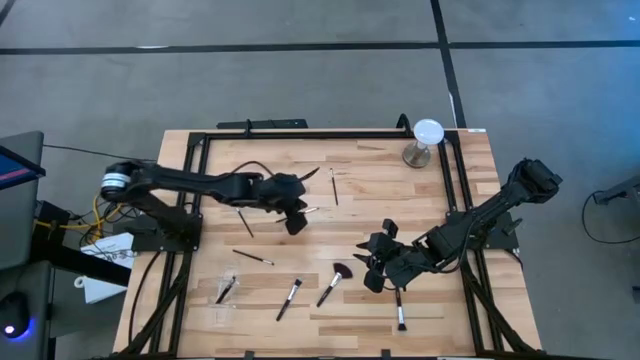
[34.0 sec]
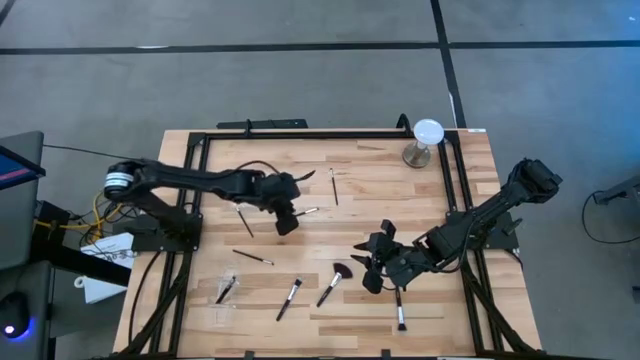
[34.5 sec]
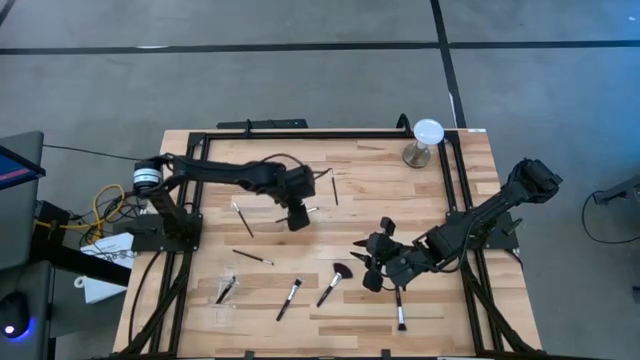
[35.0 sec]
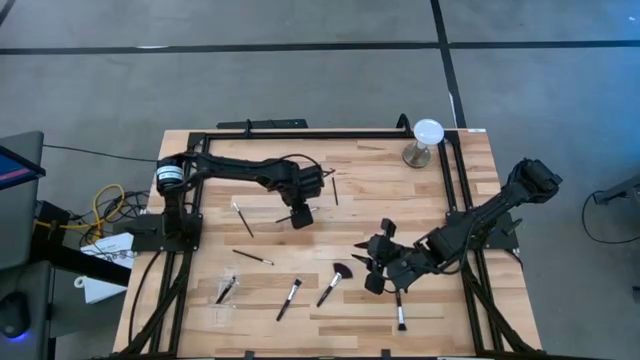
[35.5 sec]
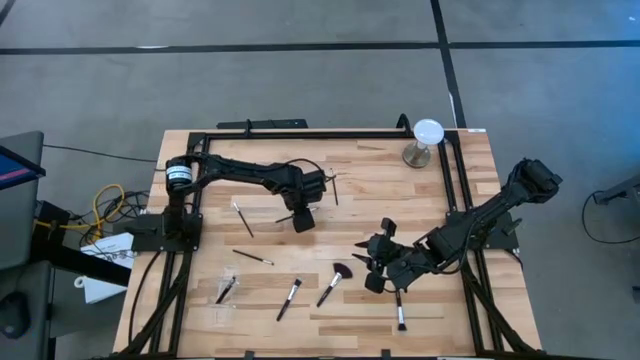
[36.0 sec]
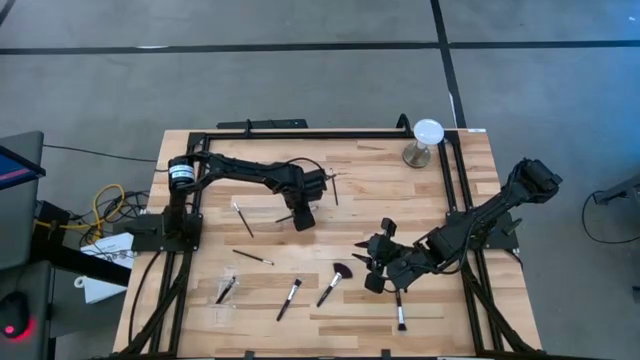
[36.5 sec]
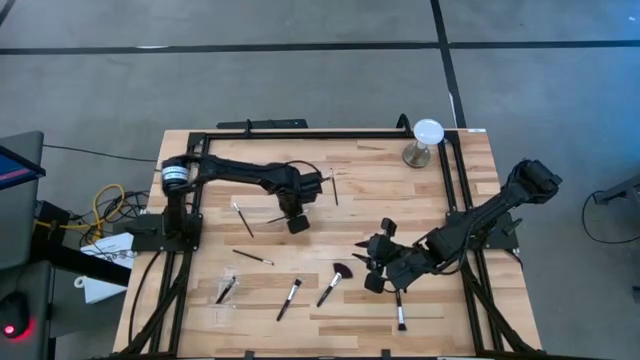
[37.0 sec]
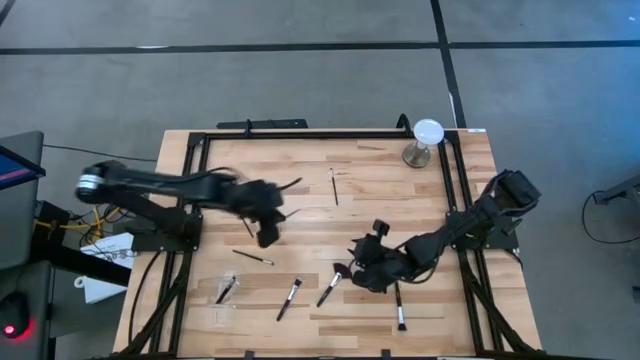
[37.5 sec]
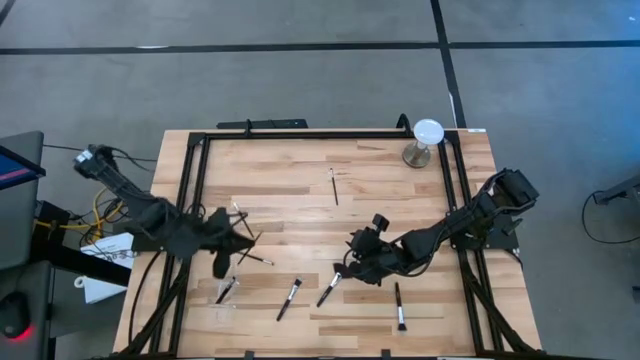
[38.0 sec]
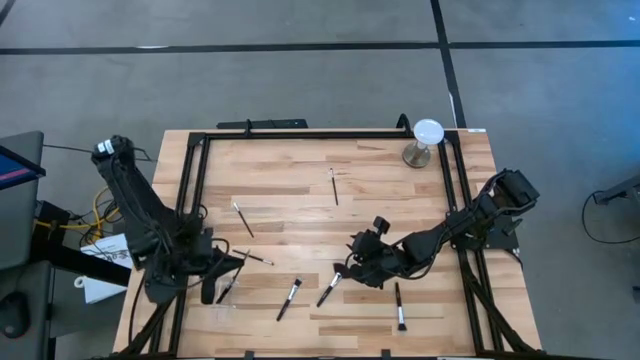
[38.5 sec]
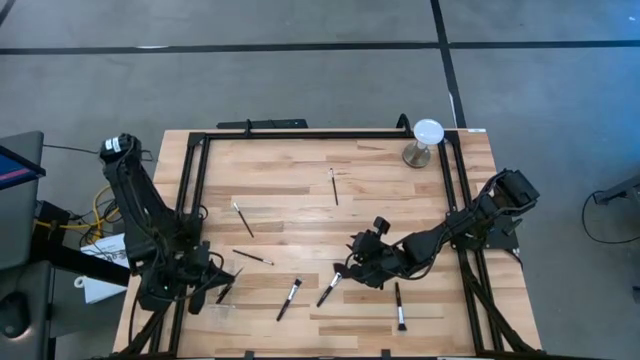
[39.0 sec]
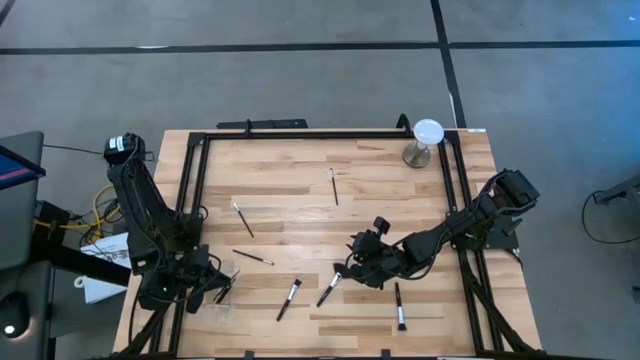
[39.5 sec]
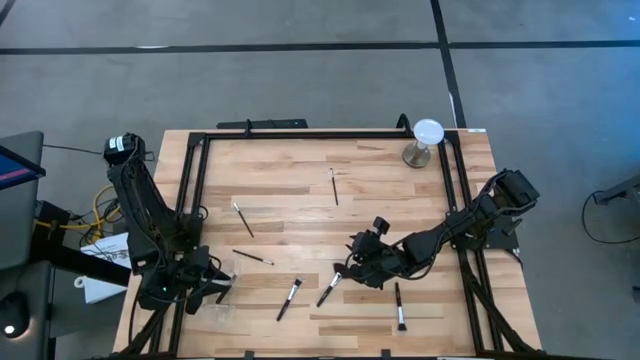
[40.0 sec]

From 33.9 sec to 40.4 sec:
Task: Put items in baskets/containers
Put the eyeshadow brush into the transparent organizer

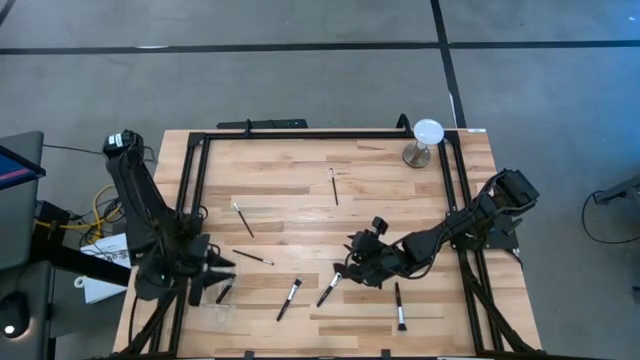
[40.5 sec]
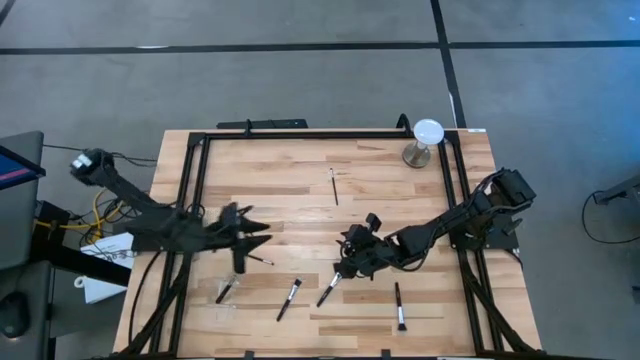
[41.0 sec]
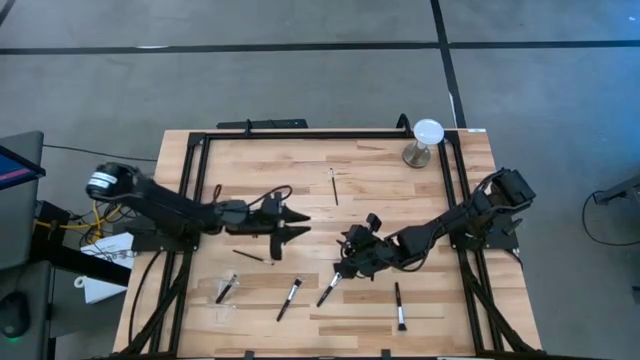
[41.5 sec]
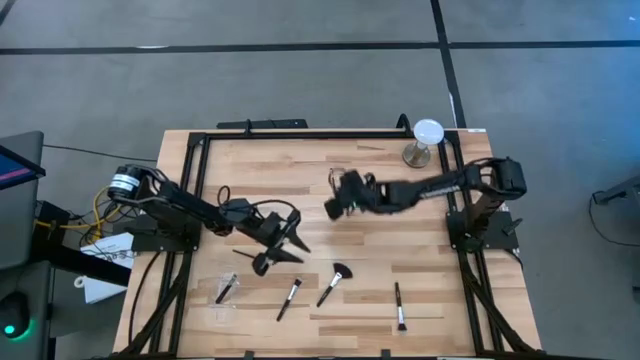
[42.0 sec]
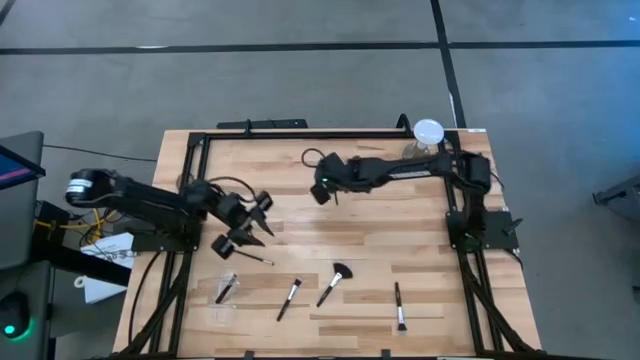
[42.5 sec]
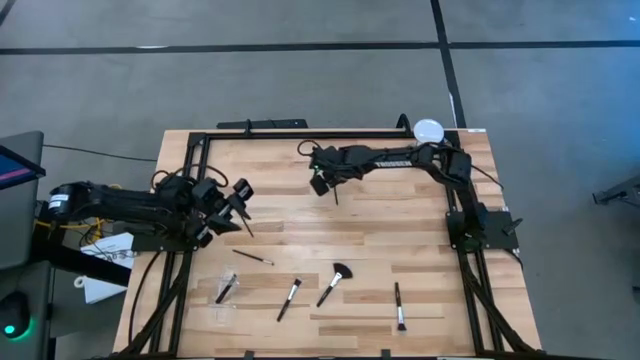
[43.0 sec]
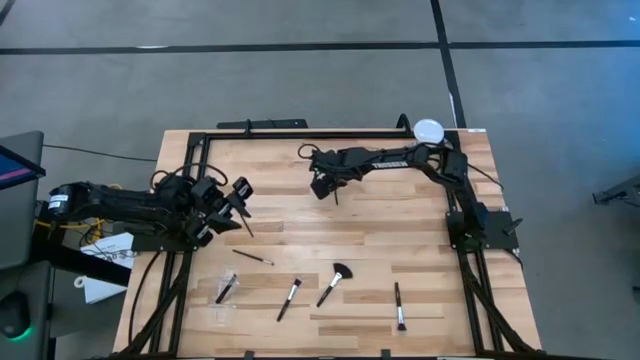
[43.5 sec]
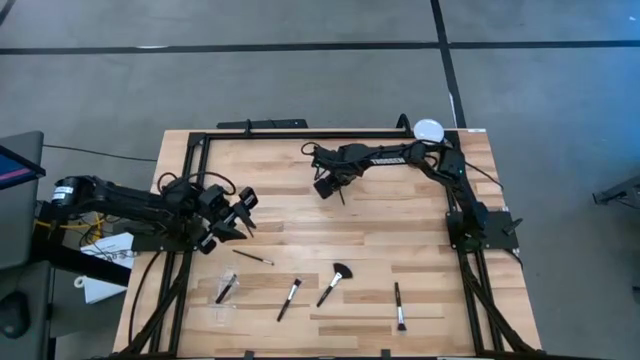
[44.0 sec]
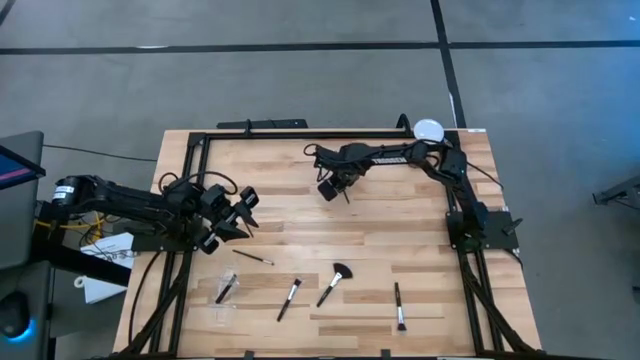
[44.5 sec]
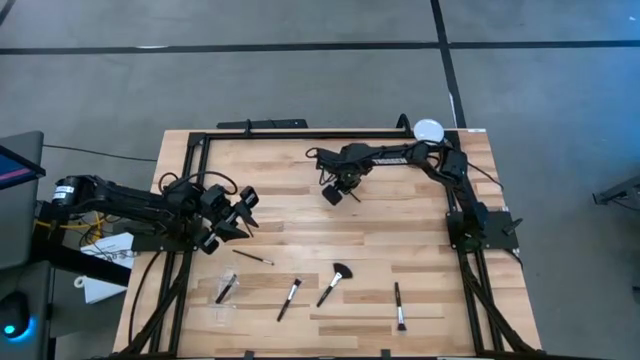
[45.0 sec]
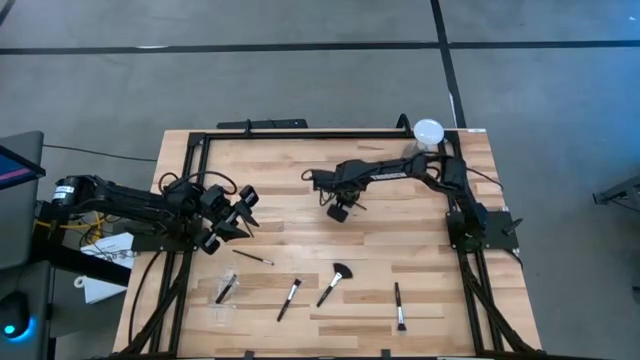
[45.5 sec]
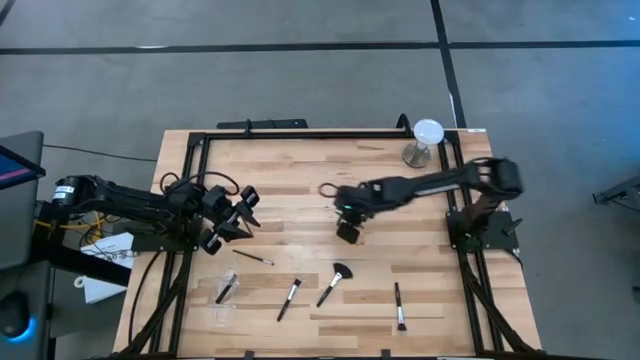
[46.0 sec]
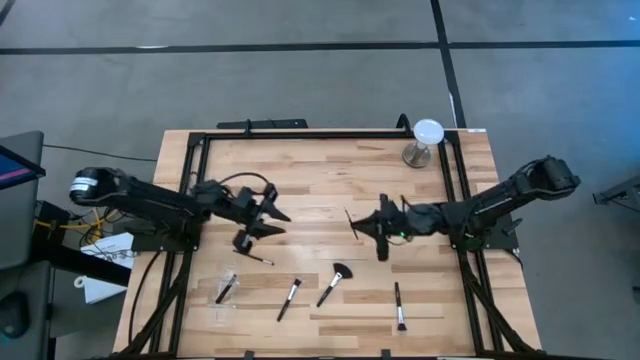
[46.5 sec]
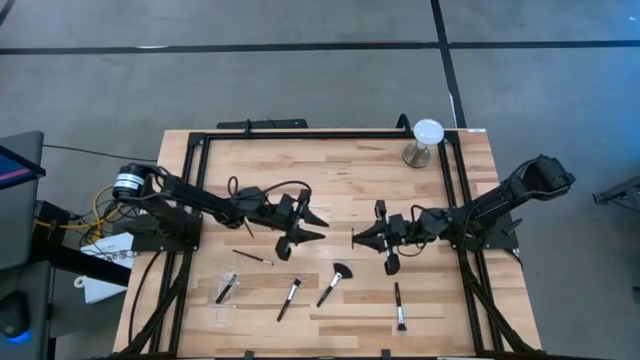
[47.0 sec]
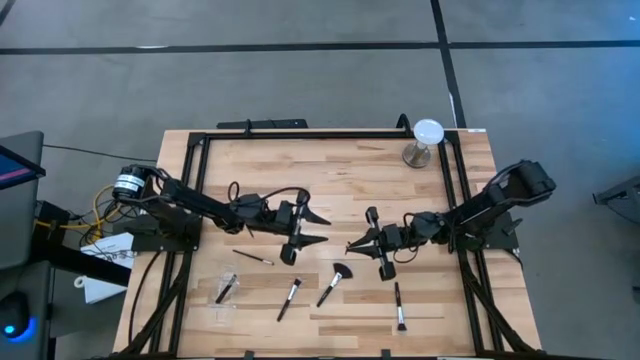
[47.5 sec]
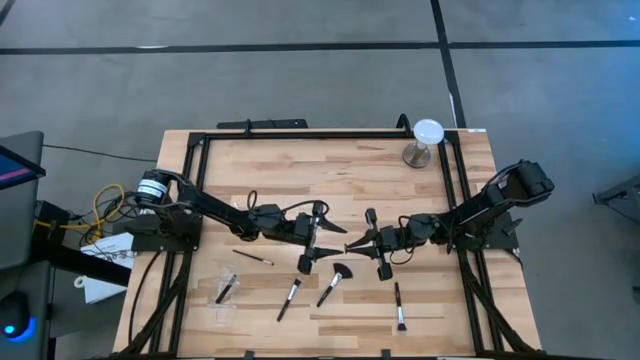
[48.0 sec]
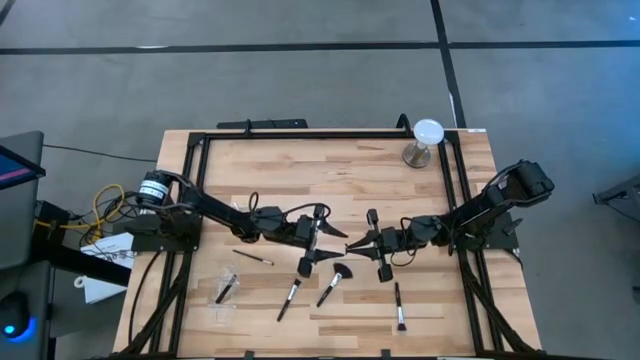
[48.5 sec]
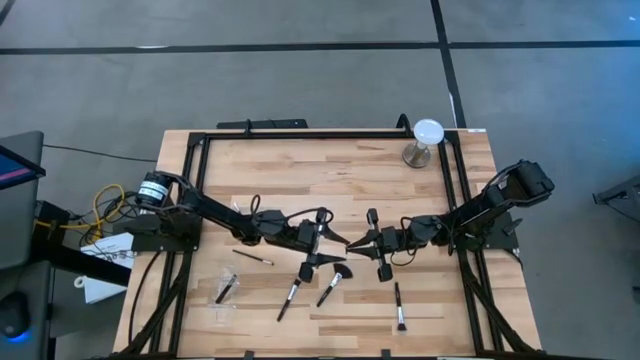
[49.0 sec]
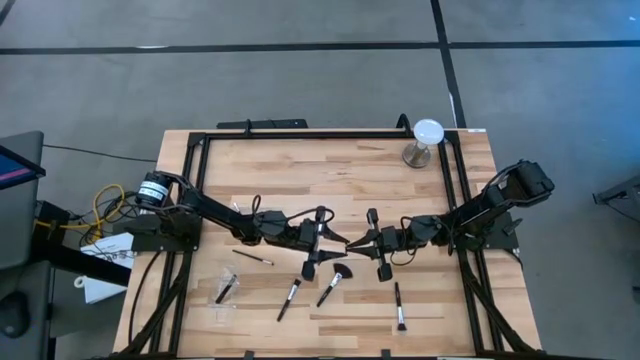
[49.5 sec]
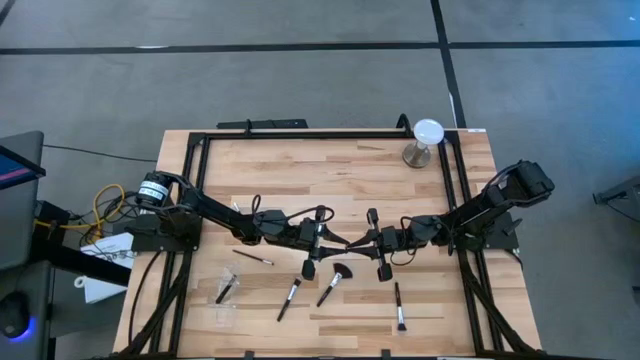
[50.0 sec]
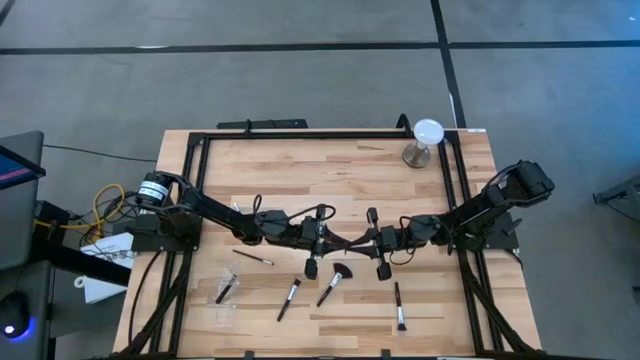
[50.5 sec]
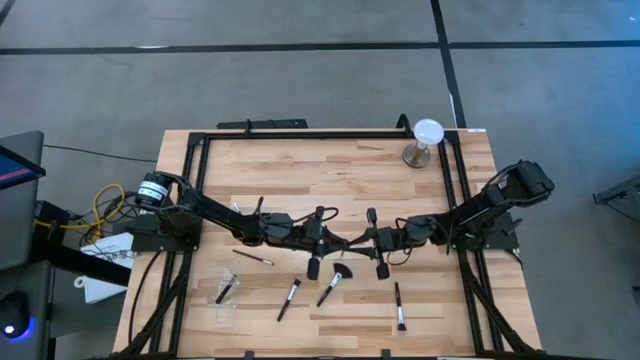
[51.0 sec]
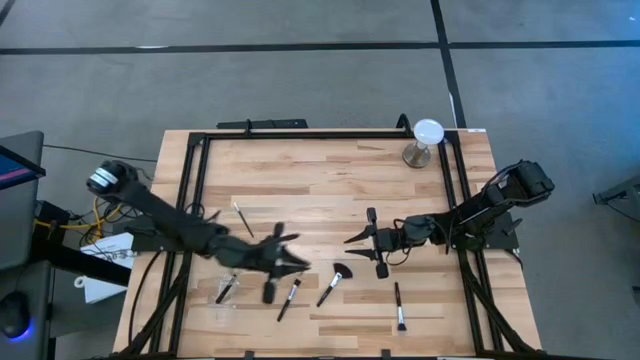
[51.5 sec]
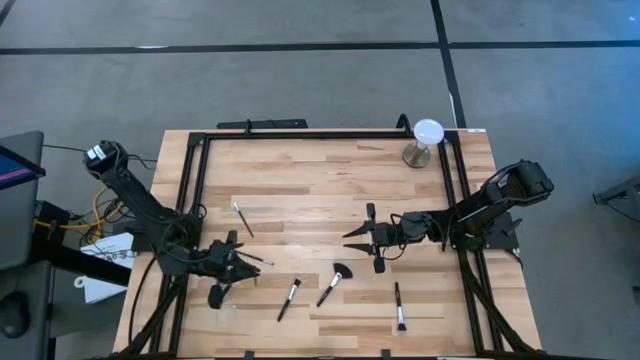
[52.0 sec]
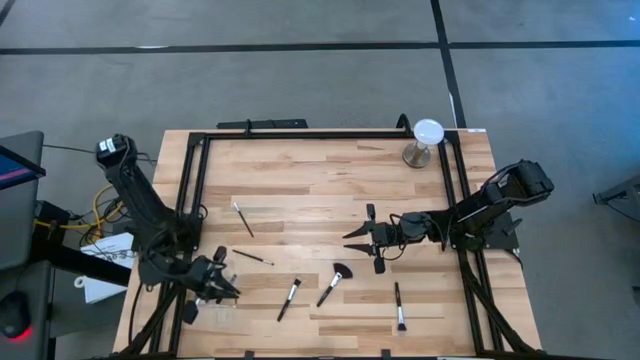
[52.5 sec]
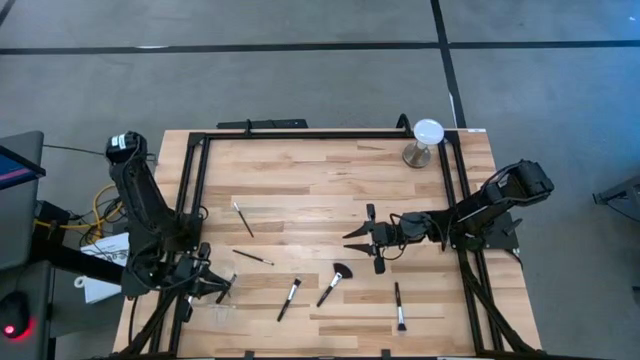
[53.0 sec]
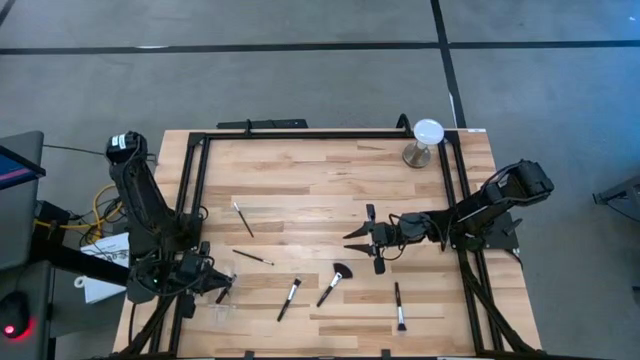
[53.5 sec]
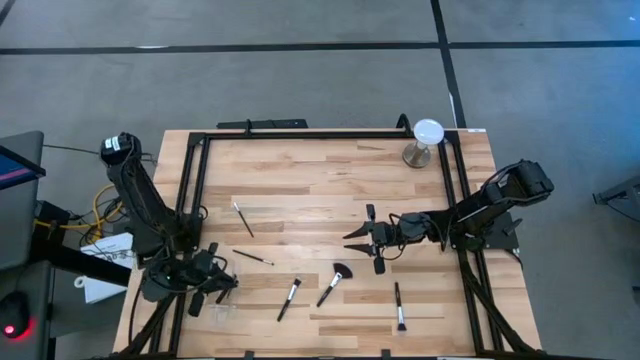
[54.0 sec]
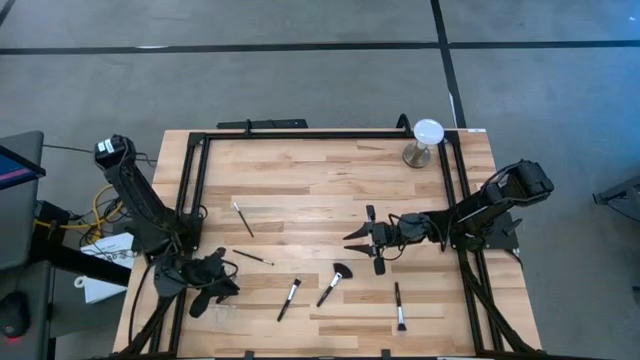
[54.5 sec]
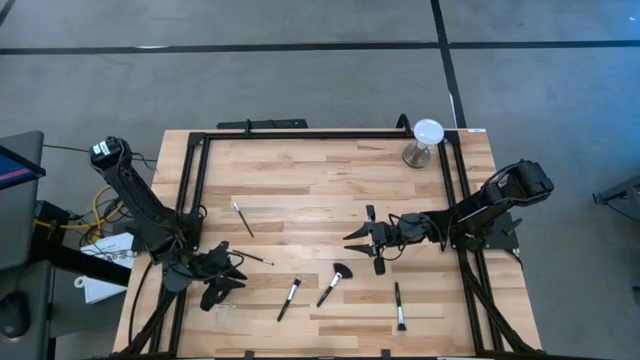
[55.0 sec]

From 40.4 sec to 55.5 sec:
Put the eyeshadow brush into the transparent organizer
